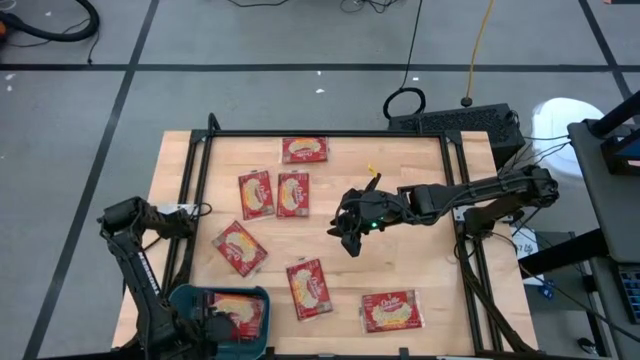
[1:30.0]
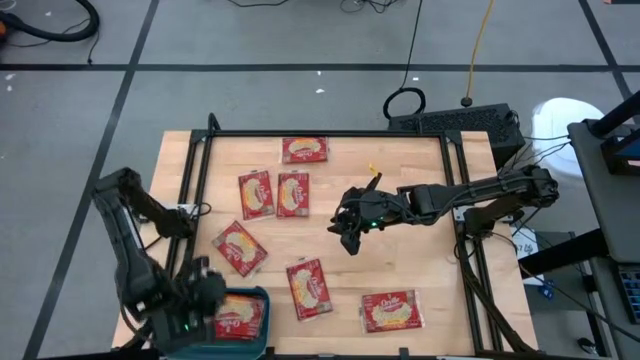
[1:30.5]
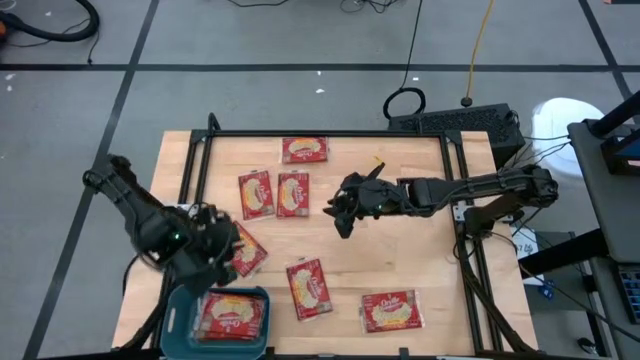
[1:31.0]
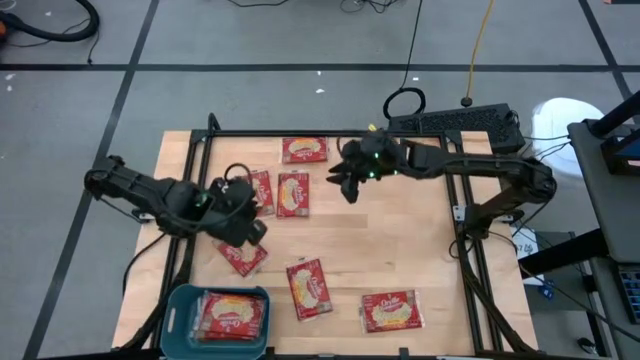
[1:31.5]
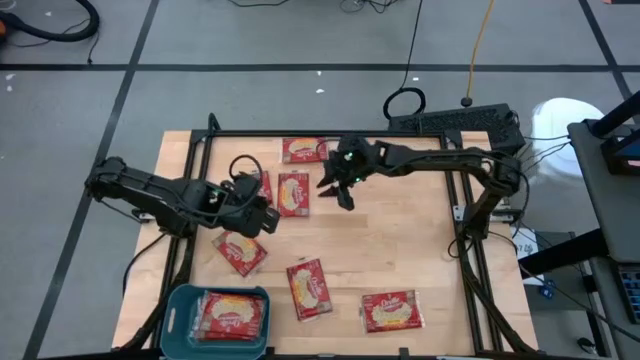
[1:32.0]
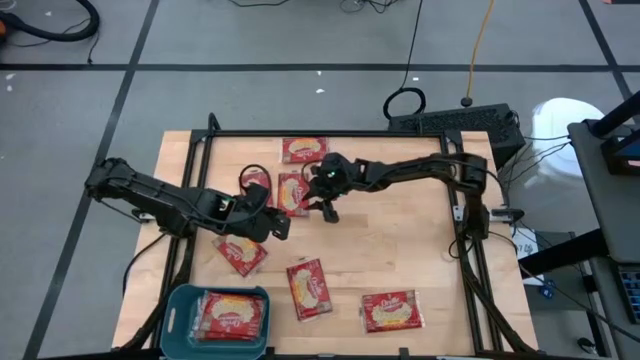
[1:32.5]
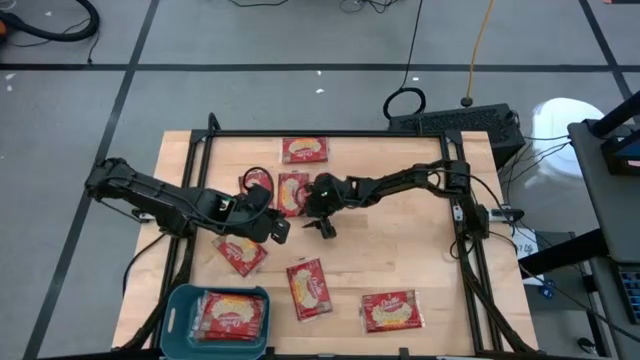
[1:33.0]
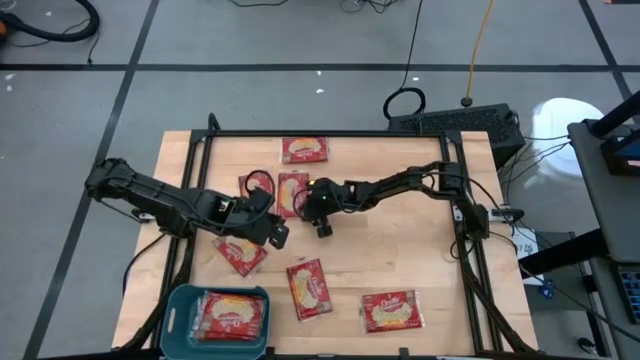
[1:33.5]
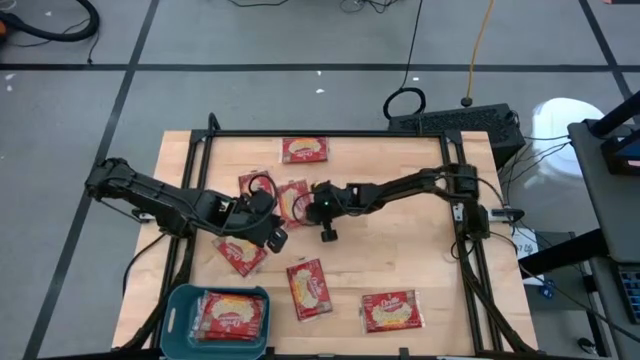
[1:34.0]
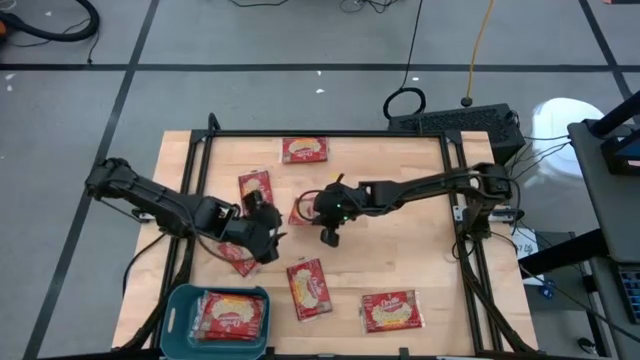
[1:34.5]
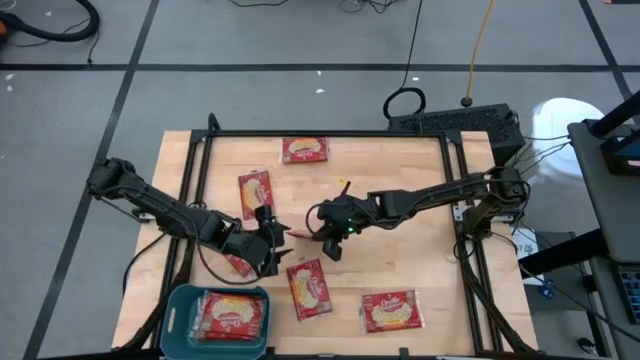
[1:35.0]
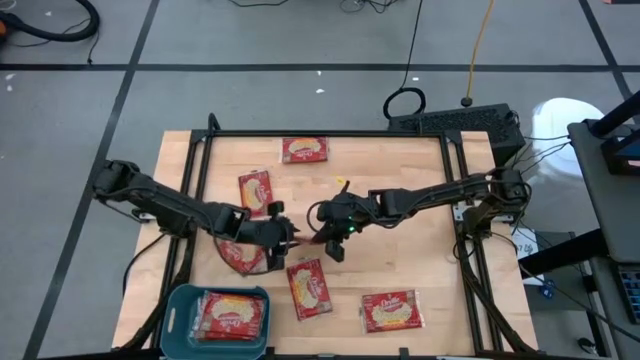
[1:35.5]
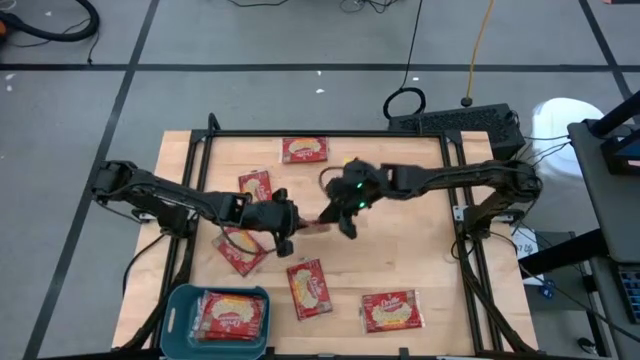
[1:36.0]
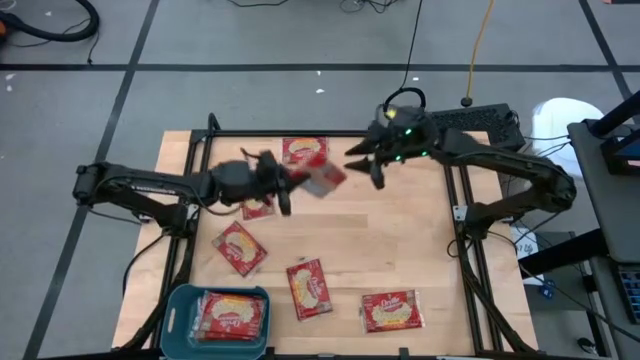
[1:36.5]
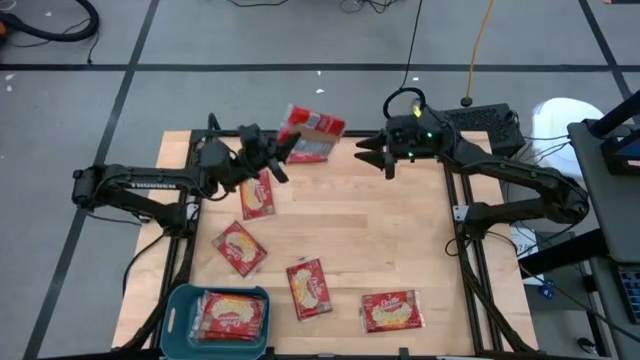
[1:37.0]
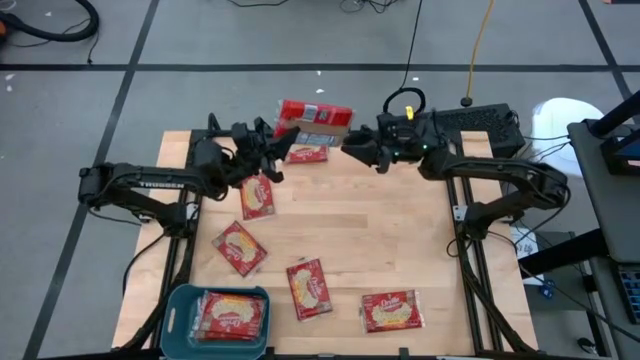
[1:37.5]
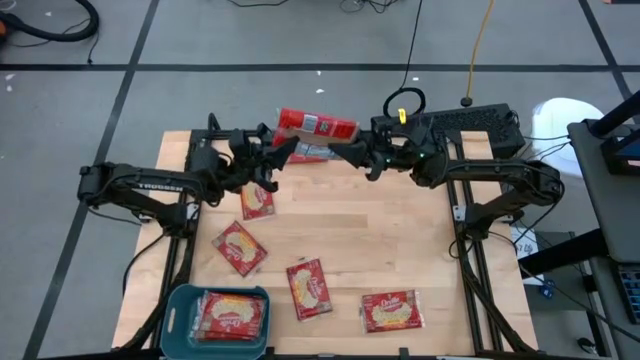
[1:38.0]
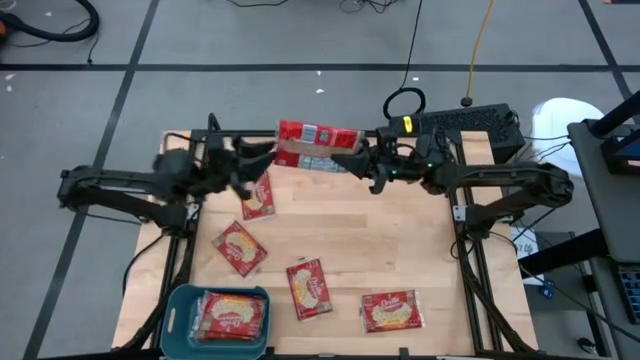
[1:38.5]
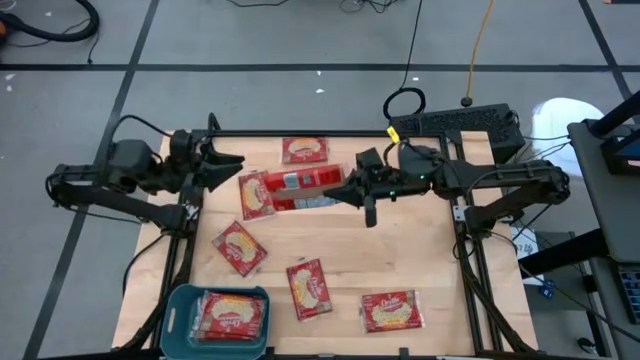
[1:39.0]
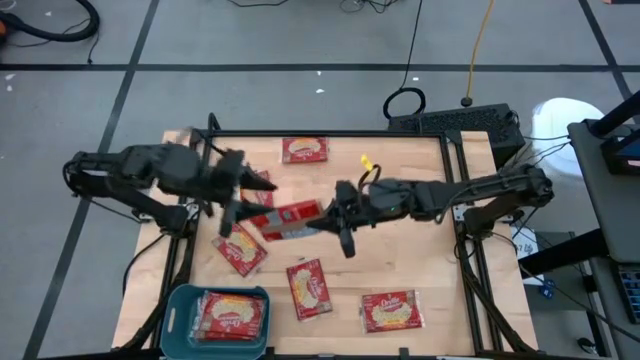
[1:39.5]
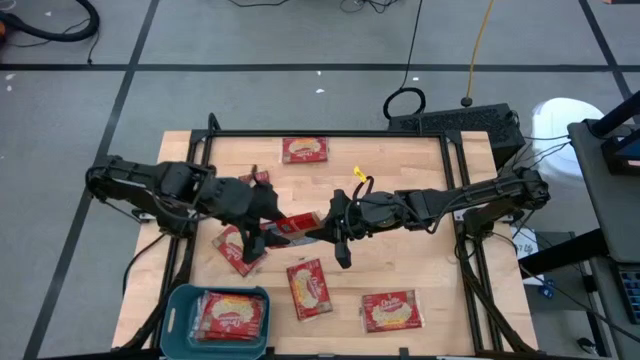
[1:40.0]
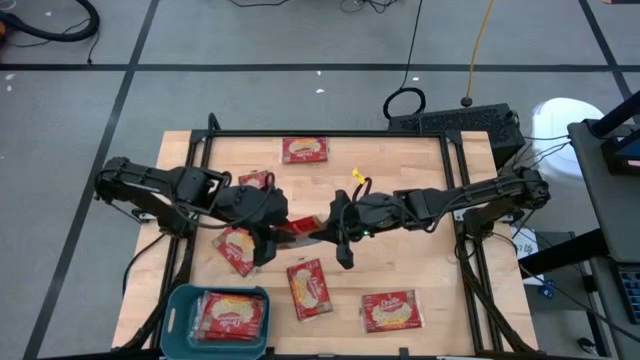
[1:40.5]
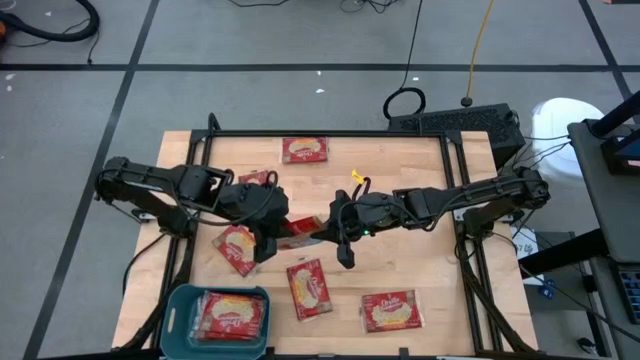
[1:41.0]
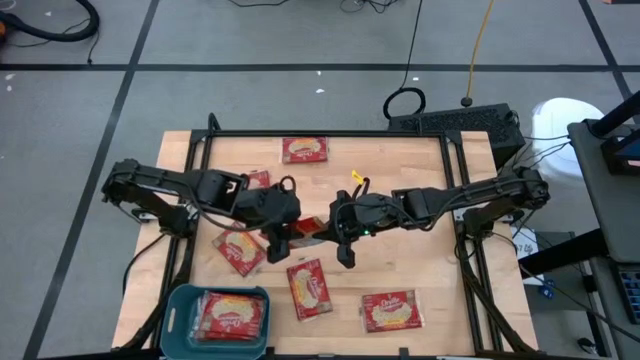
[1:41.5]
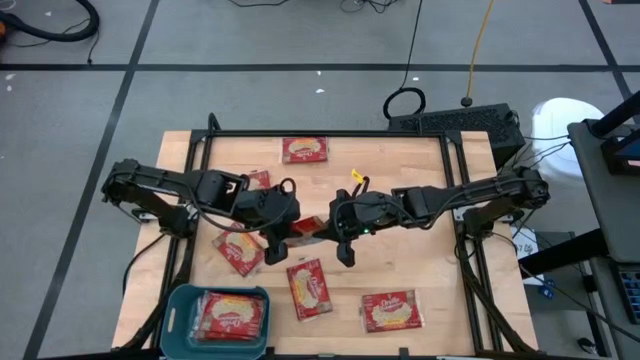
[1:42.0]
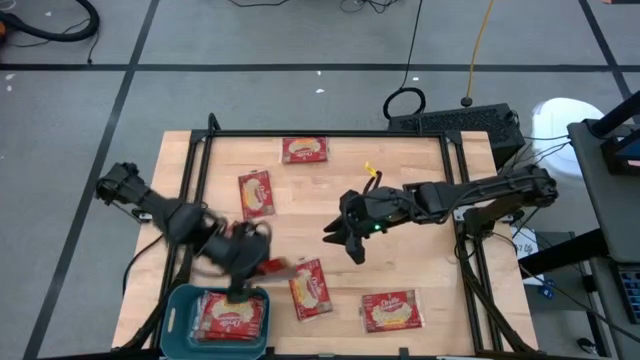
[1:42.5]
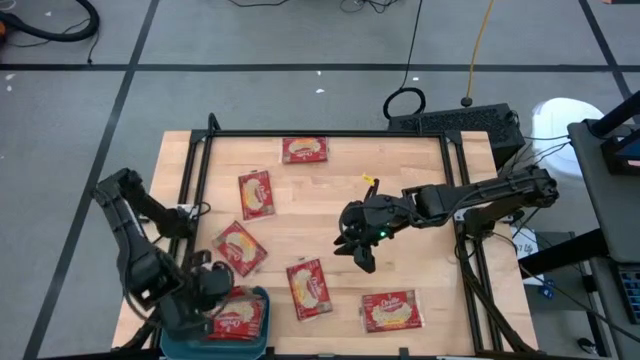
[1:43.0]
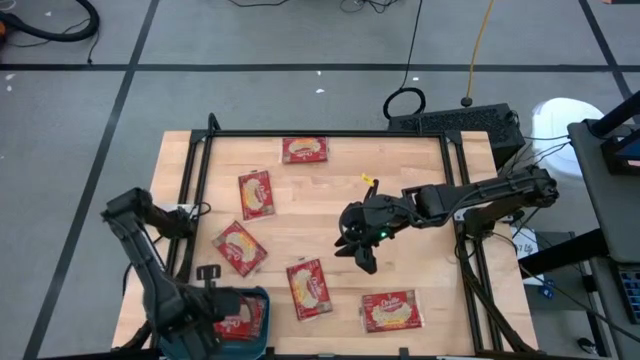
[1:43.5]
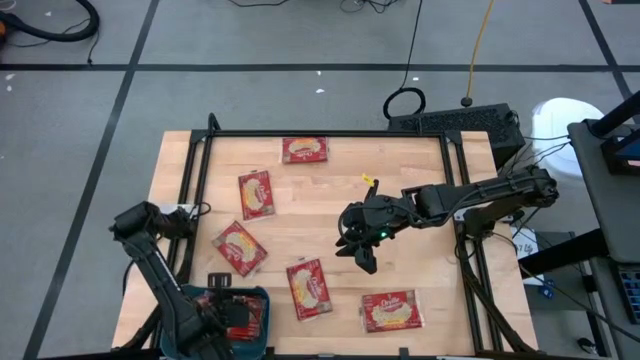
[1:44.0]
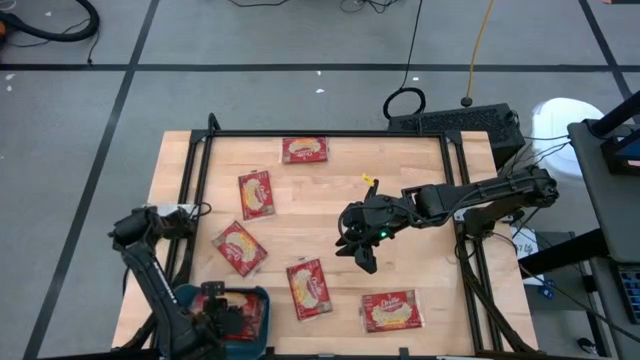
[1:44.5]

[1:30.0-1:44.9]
Task: Sort popcorn bags into baskets
Put the popcorn sachet into the bin
